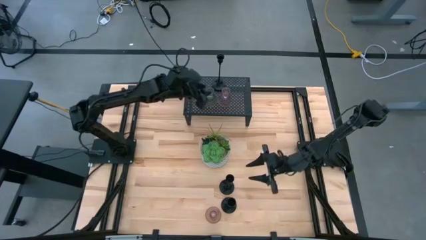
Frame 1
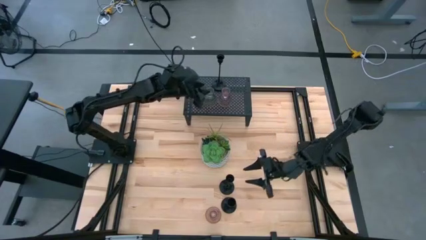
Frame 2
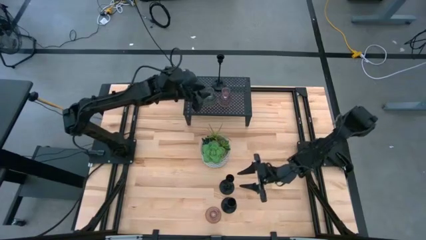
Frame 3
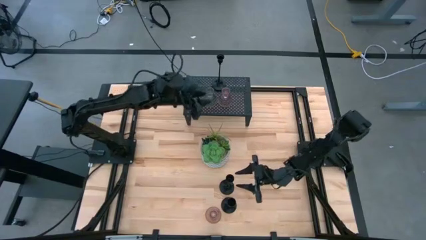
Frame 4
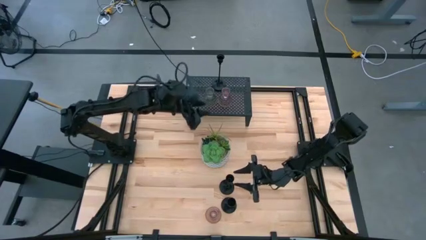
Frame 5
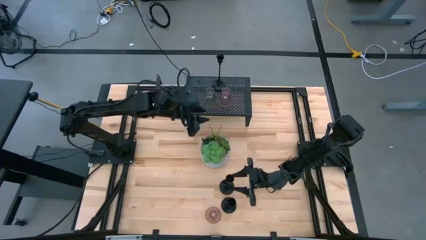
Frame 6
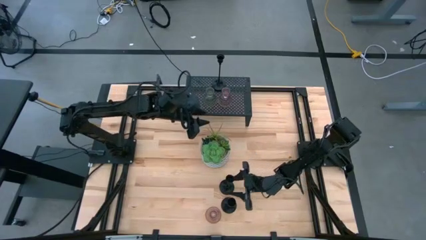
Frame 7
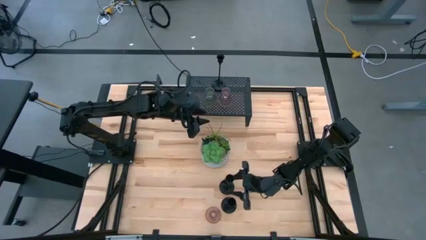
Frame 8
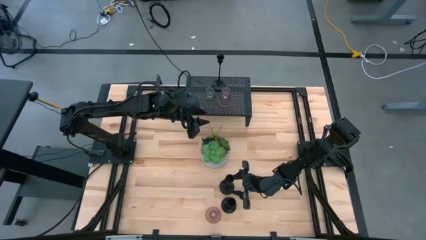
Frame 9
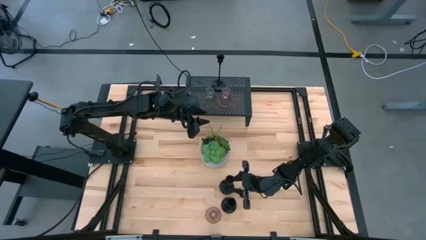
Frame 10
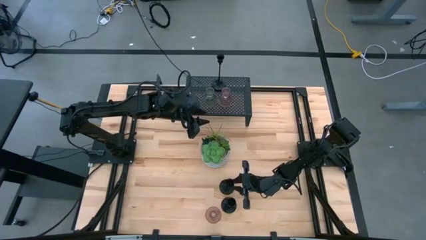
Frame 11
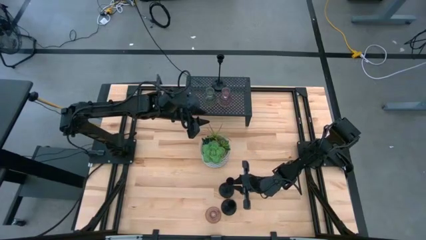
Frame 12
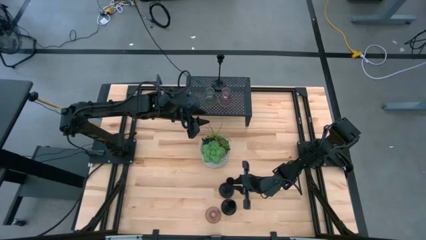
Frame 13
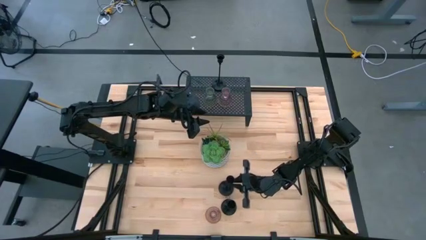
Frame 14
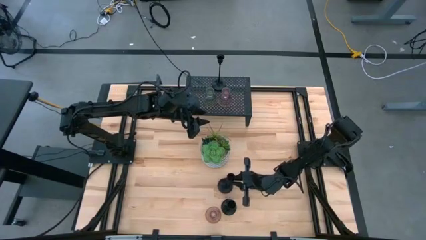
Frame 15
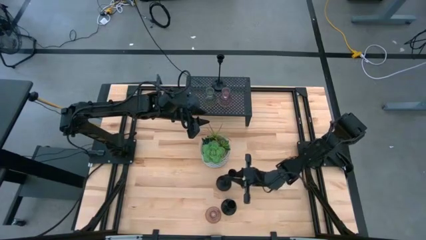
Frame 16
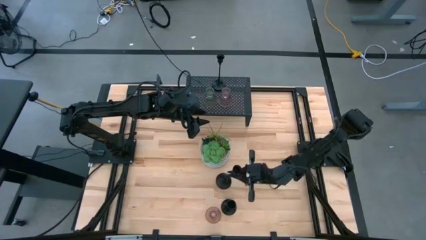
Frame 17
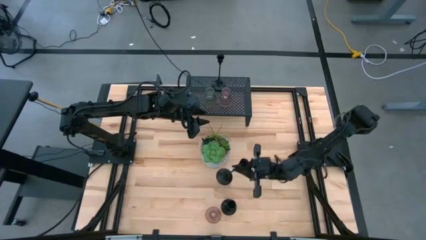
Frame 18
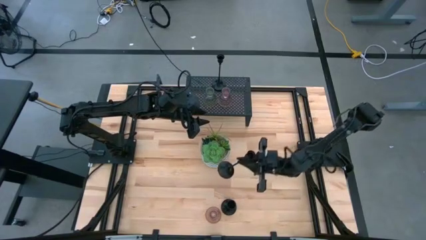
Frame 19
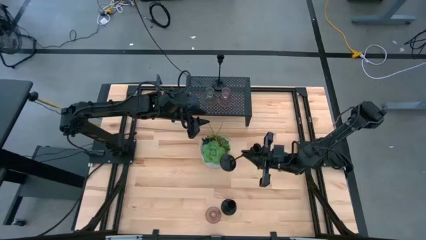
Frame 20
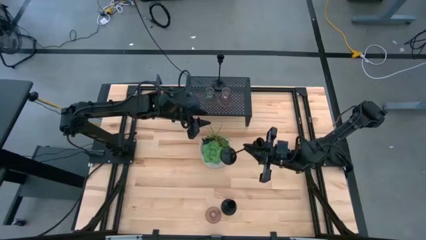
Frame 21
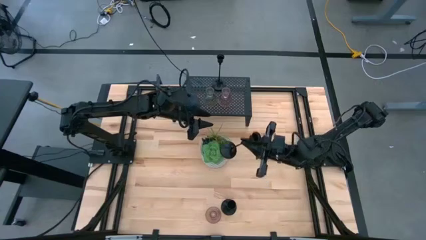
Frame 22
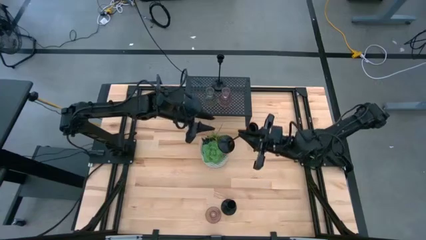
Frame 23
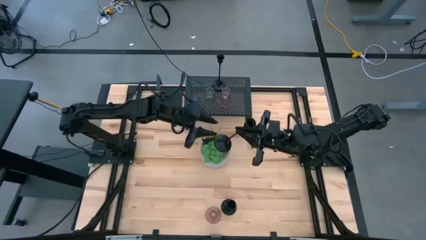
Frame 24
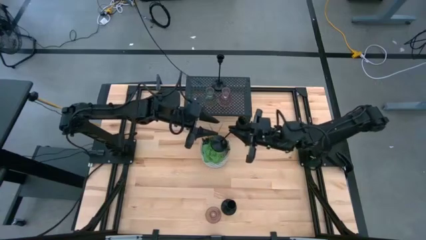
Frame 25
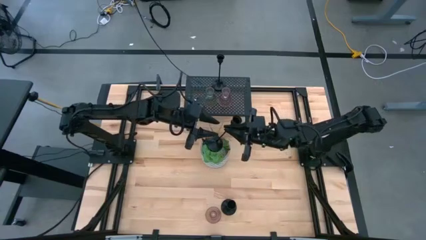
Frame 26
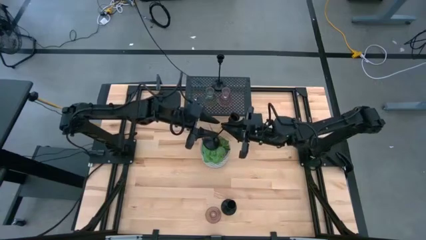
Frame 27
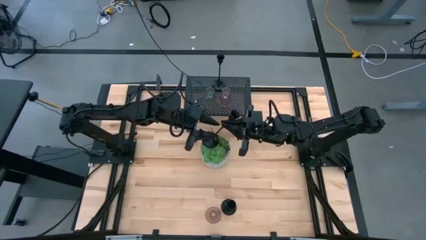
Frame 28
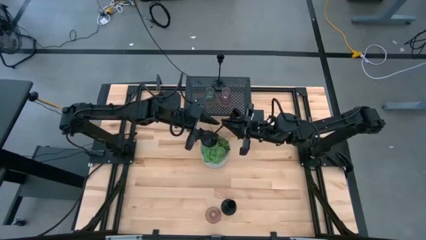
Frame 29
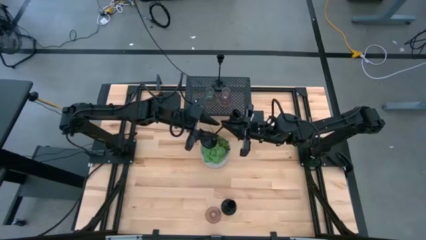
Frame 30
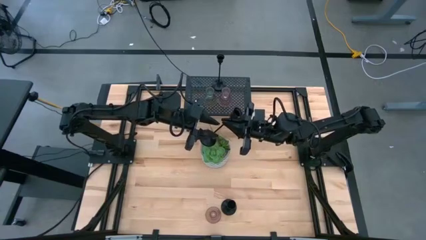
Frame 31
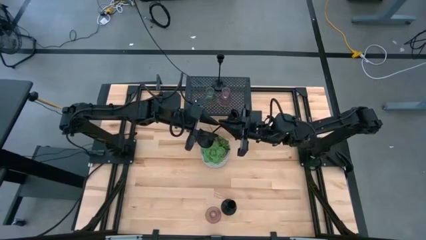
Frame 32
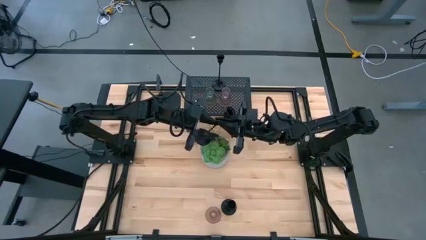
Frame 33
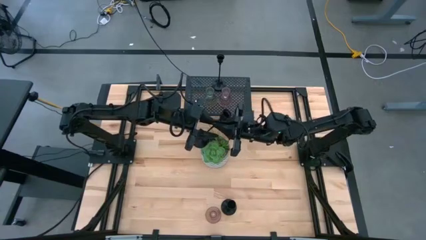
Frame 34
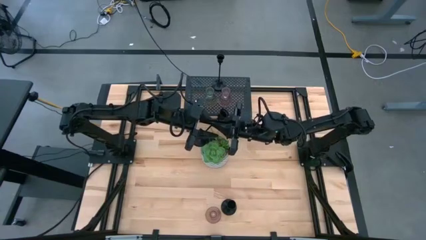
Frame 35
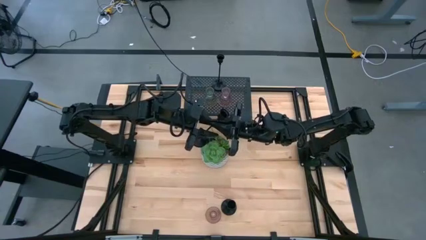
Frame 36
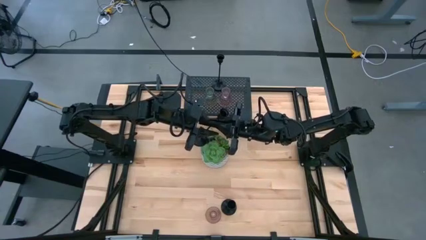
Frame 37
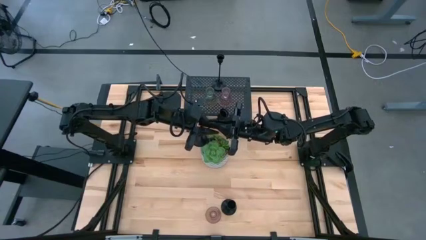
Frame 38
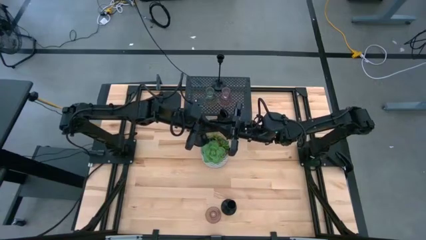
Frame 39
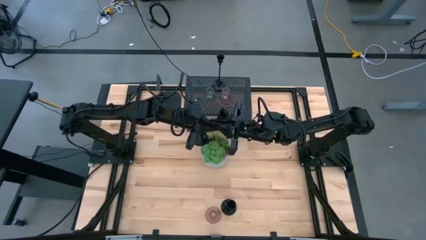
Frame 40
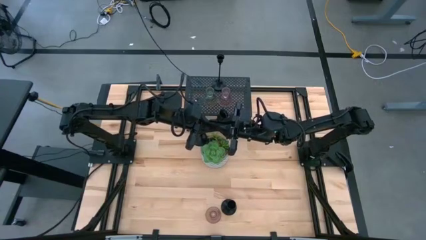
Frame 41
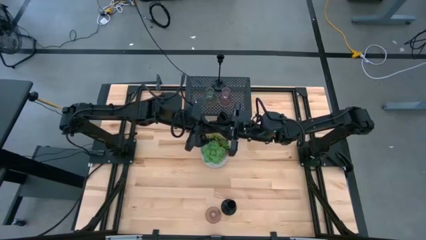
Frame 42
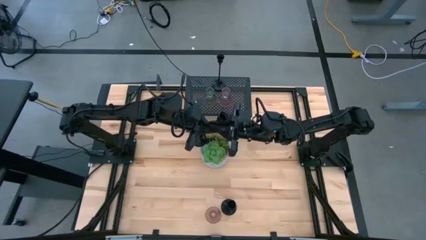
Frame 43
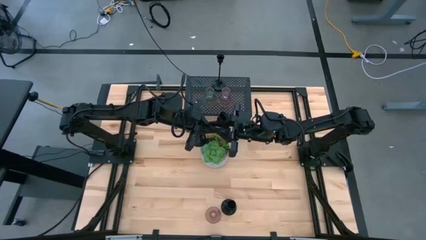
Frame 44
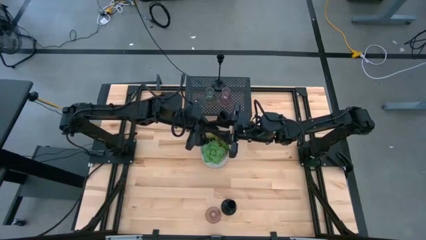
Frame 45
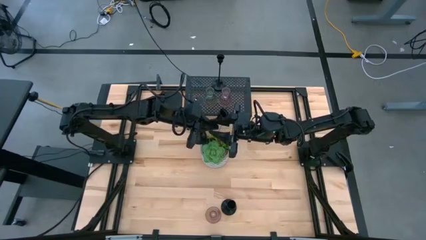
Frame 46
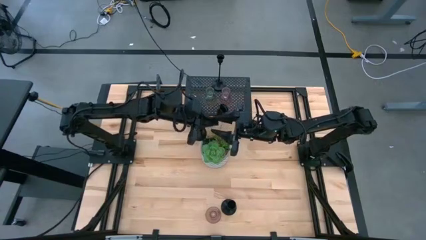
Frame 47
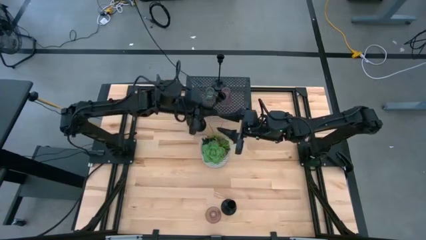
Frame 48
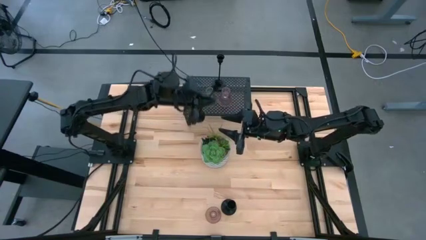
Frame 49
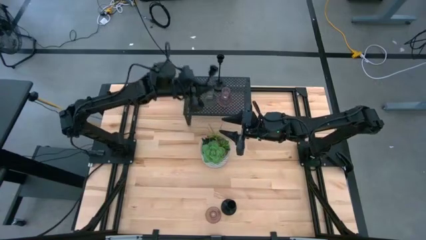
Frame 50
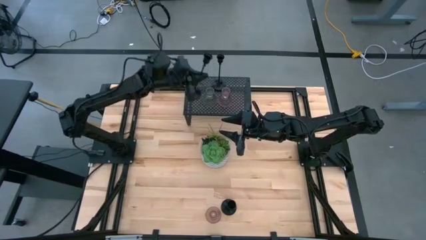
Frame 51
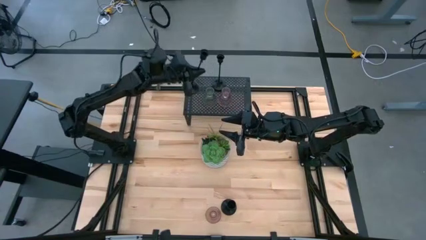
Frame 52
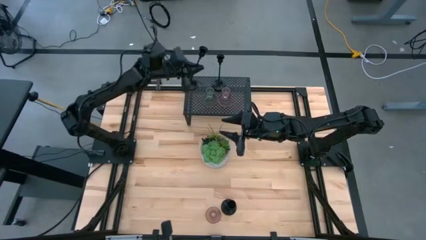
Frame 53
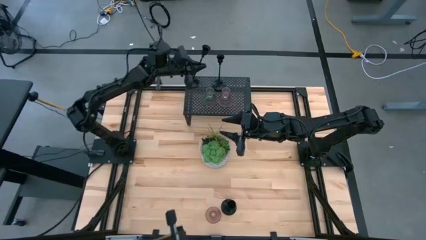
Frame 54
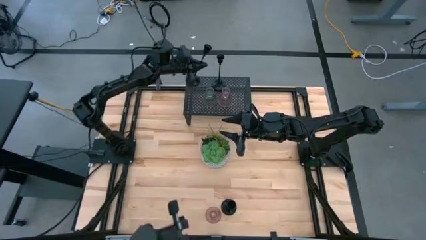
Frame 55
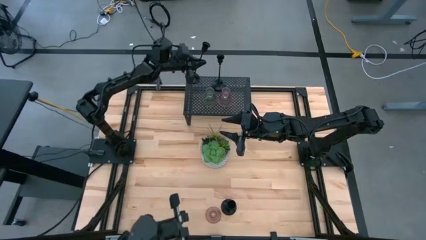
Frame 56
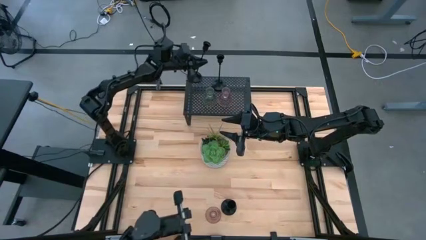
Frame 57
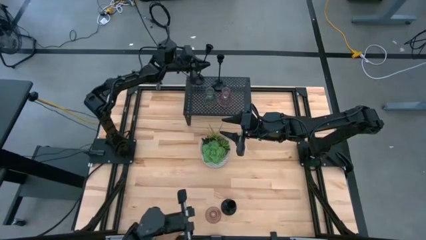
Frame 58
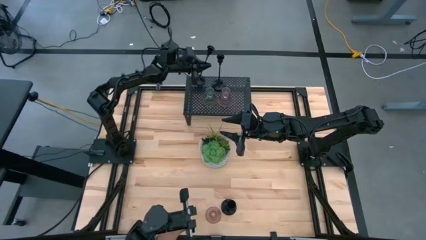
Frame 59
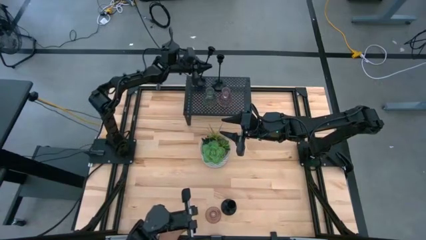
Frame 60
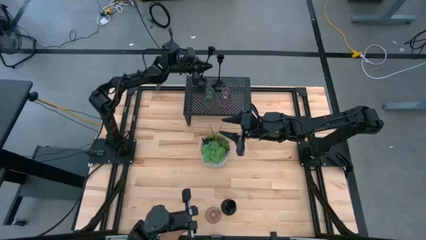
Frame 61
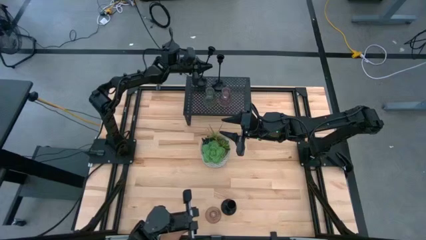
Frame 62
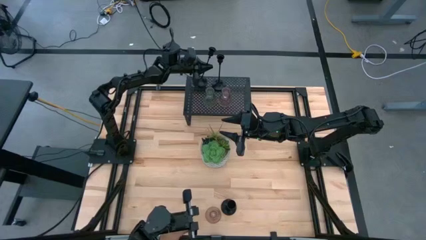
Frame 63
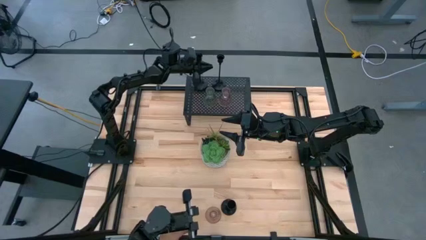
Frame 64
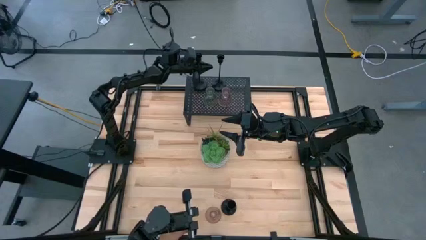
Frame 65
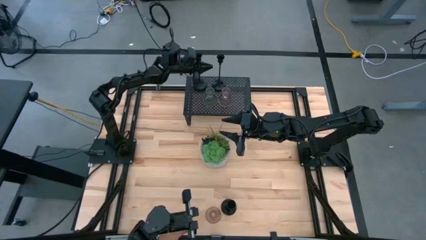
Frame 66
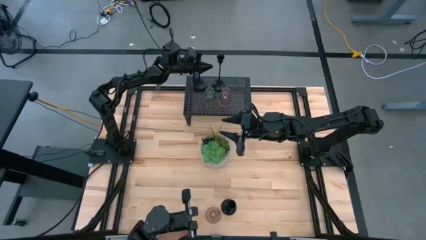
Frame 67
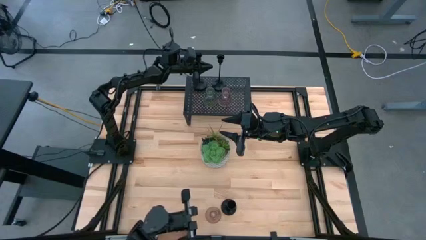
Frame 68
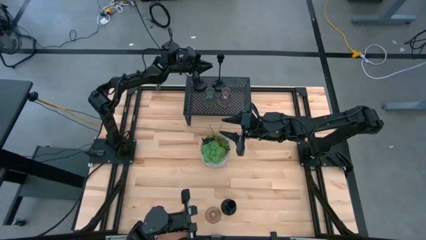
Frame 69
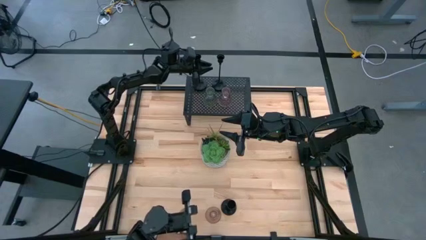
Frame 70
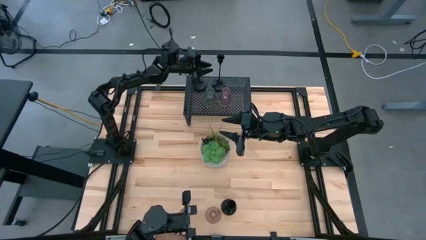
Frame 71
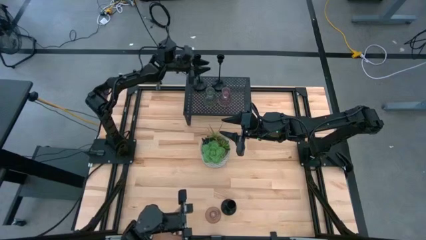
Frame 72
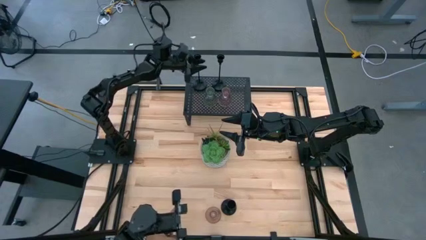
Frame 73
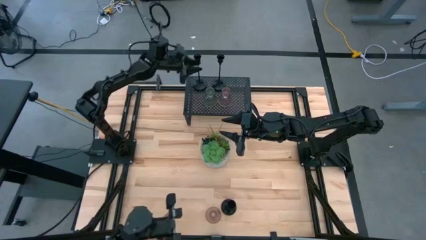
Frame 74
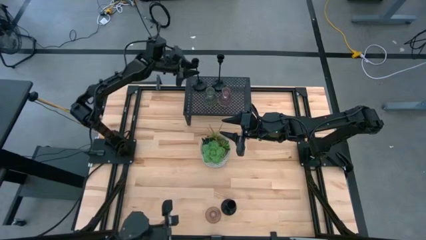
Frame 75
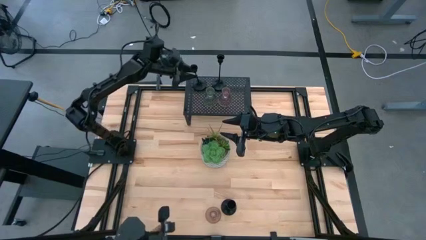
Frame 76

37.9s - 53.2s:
Task: Pick & Place candle stick holders
Put the top black candle holder on the shelf aligned with the other black candle holder

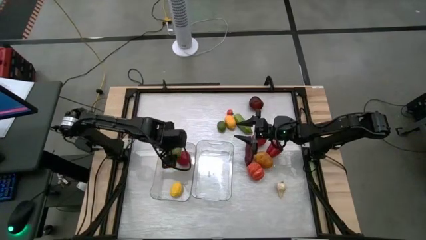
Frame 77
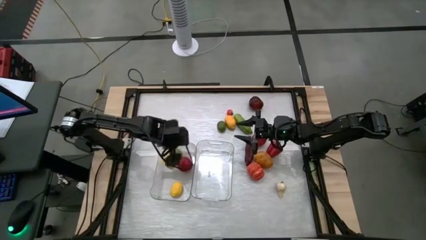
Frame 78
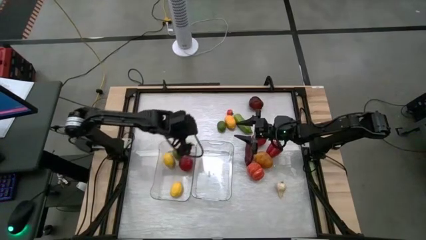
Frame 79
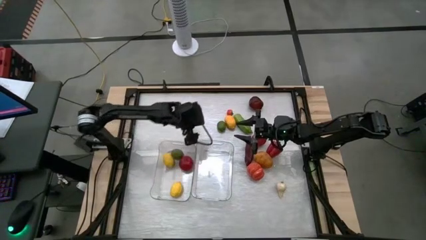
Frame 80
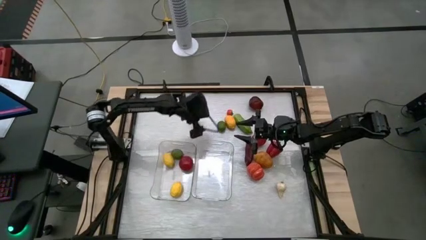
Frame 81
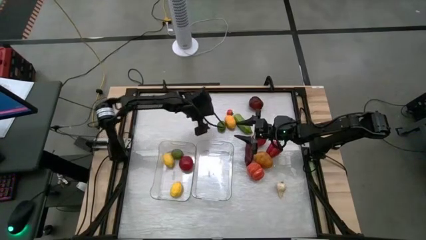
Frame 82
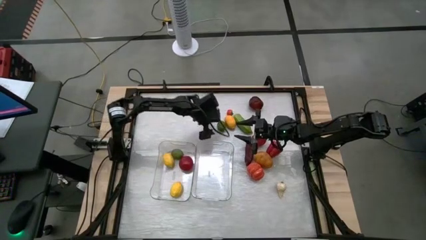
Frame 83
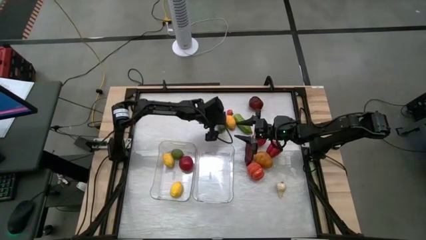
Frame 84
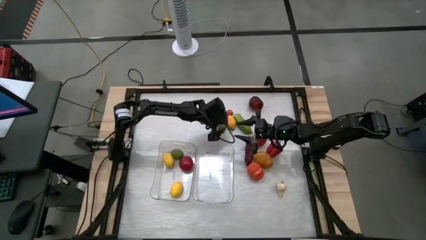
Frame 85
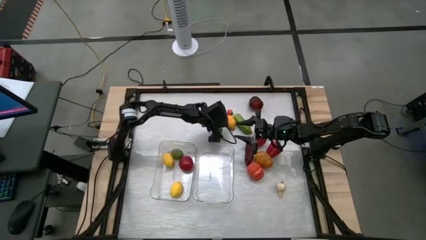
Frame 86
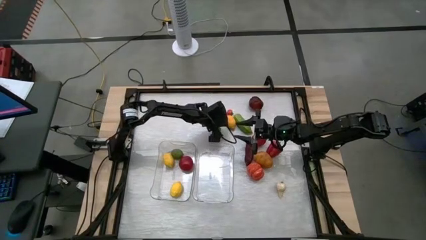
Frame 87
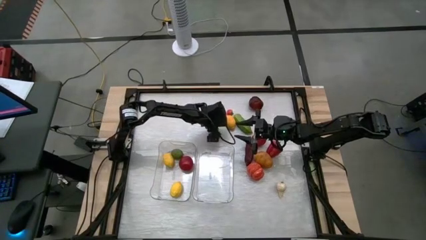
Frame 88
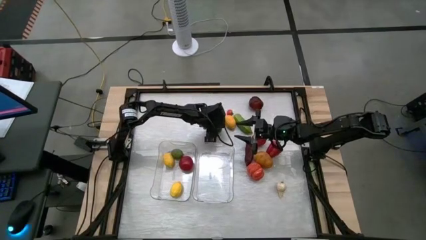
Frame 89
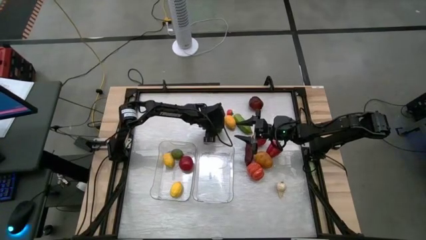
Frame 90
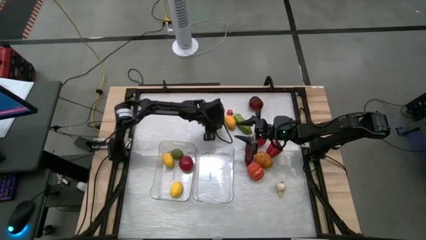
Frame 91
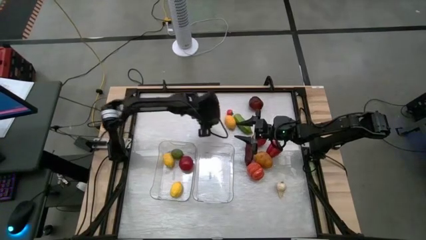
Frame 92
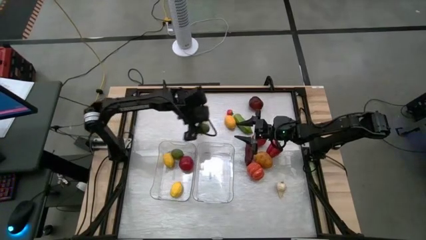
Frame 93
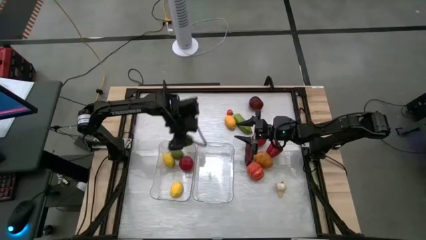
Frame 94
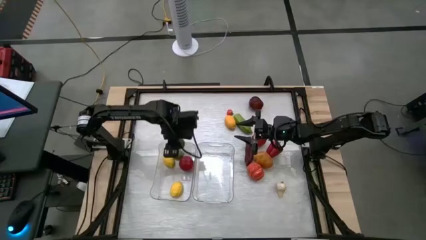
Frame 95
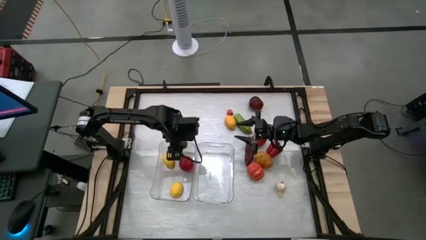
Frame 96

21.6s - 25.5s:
Task: Sort produce into baskets
Put the green lime into the left transparent bin
